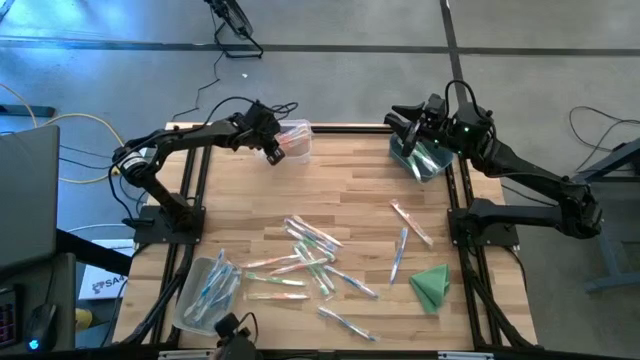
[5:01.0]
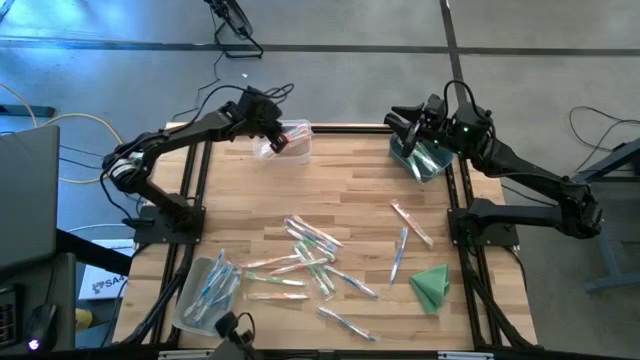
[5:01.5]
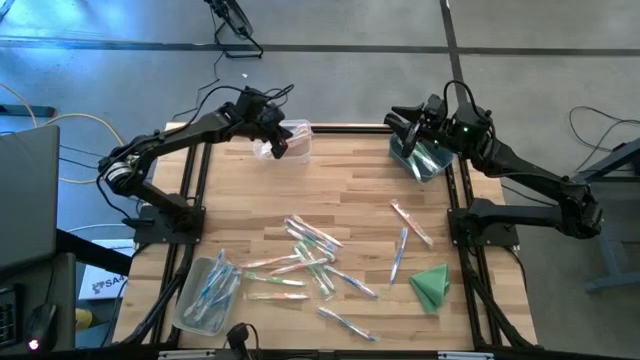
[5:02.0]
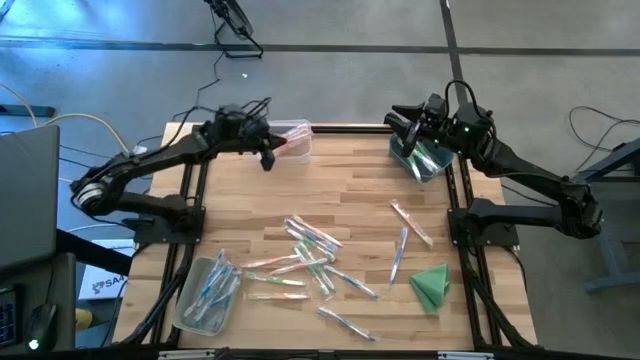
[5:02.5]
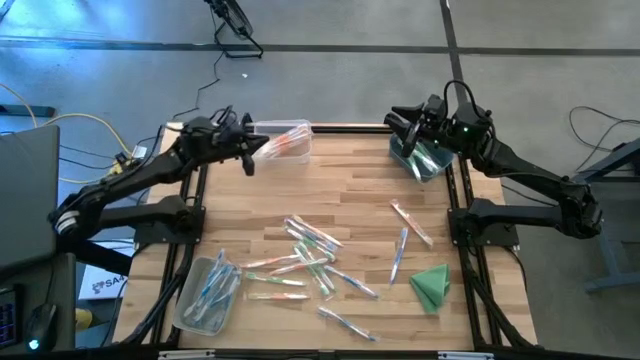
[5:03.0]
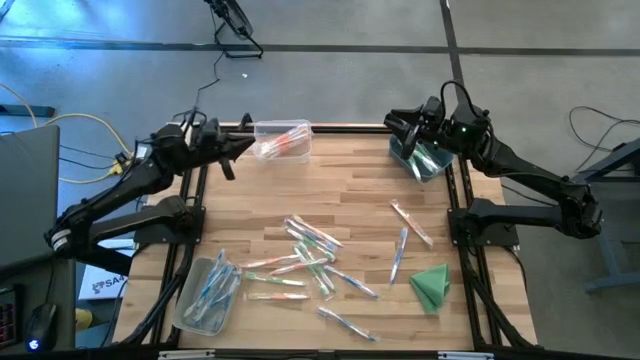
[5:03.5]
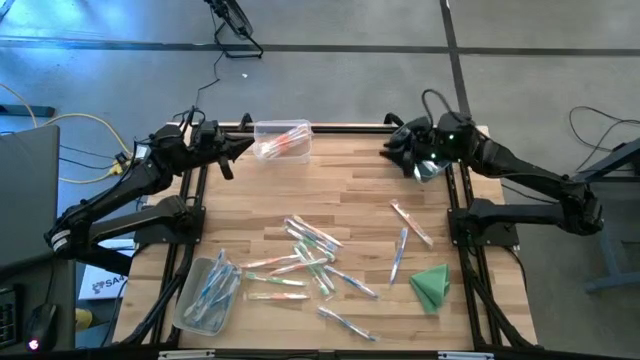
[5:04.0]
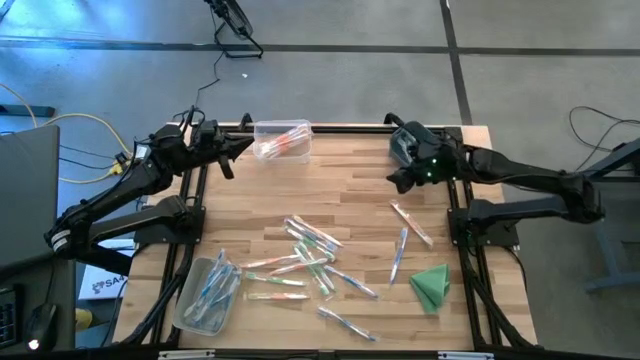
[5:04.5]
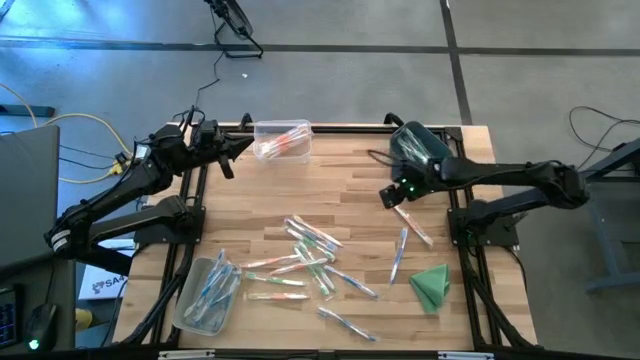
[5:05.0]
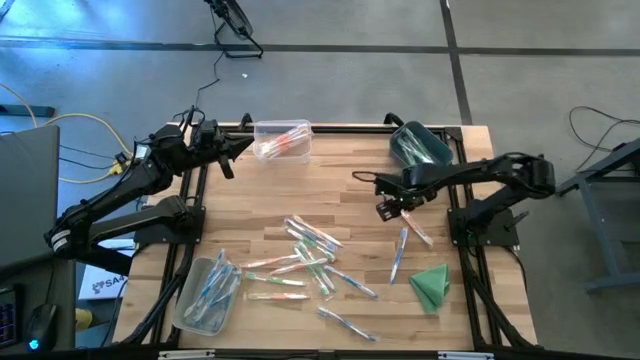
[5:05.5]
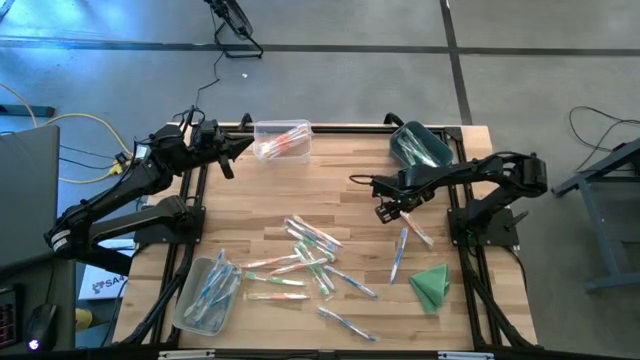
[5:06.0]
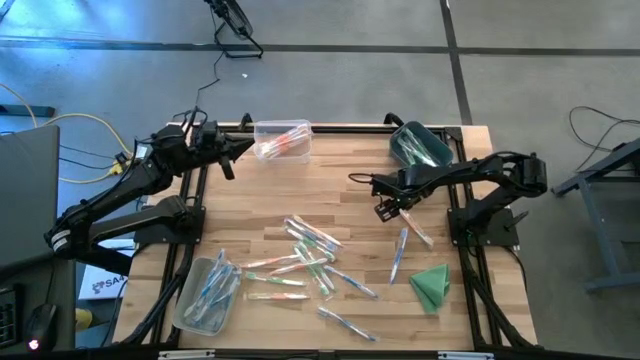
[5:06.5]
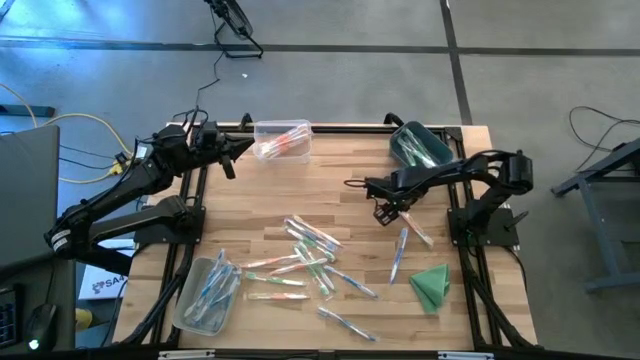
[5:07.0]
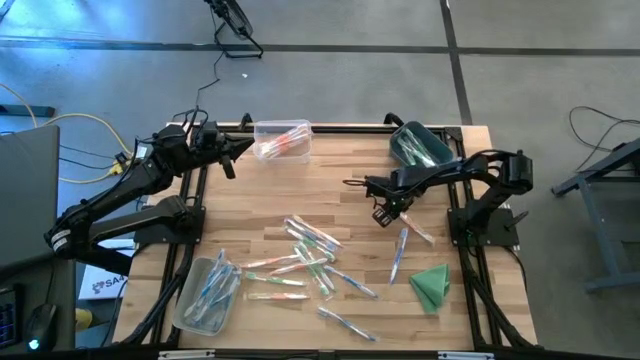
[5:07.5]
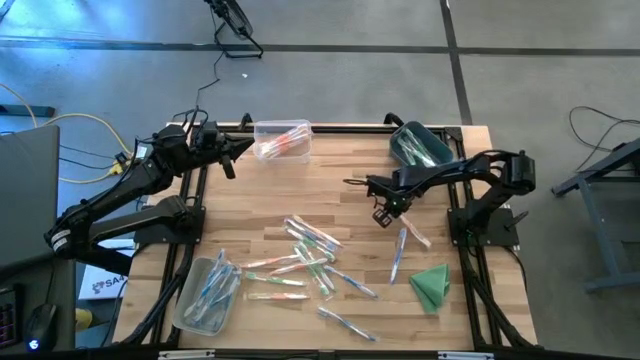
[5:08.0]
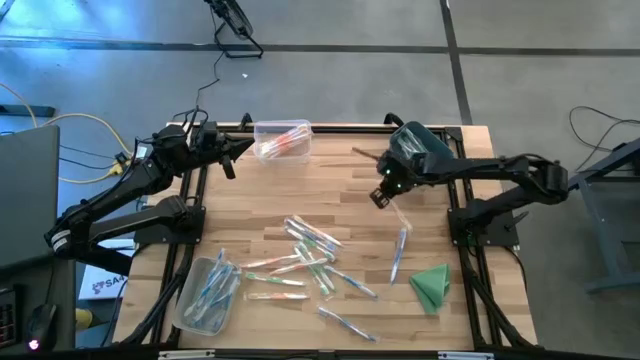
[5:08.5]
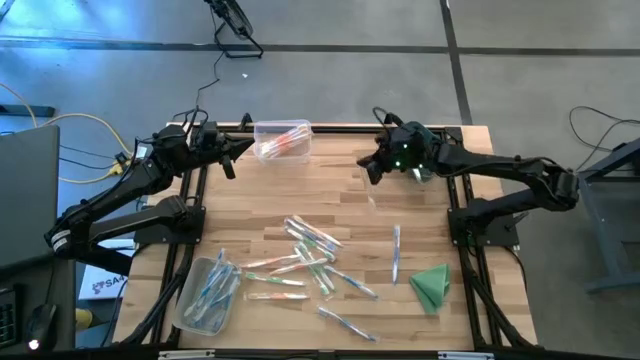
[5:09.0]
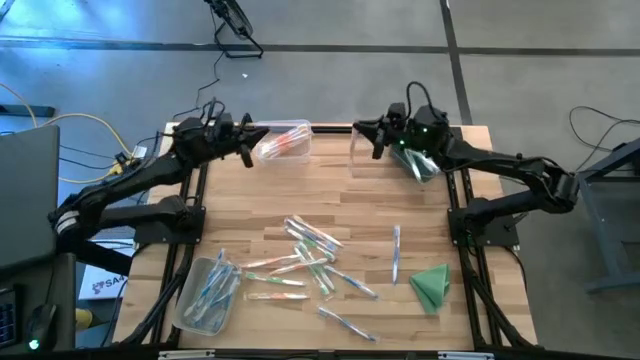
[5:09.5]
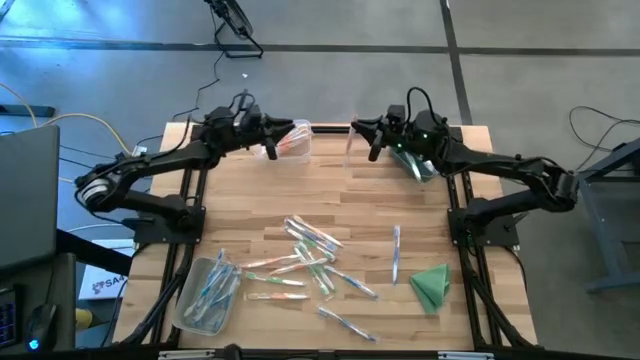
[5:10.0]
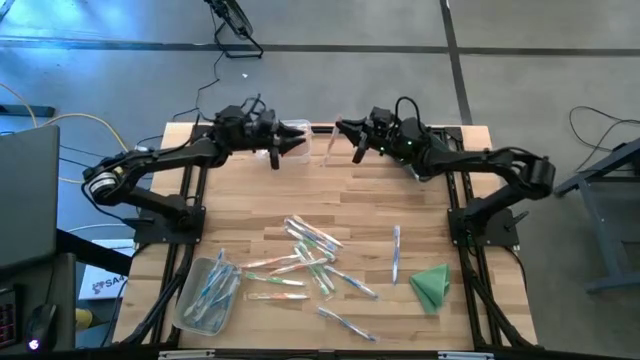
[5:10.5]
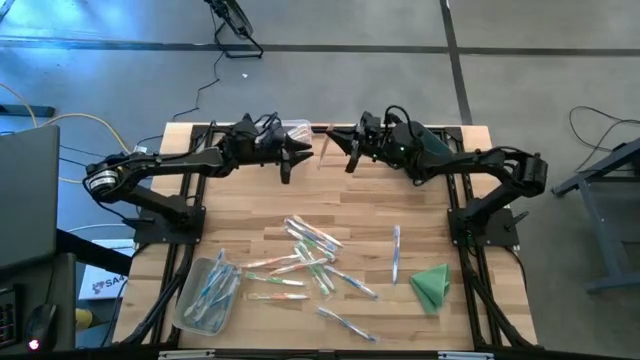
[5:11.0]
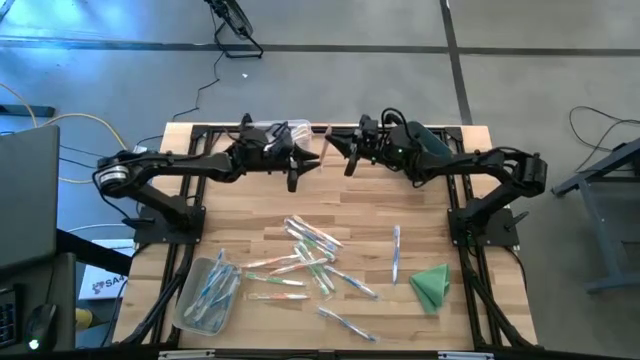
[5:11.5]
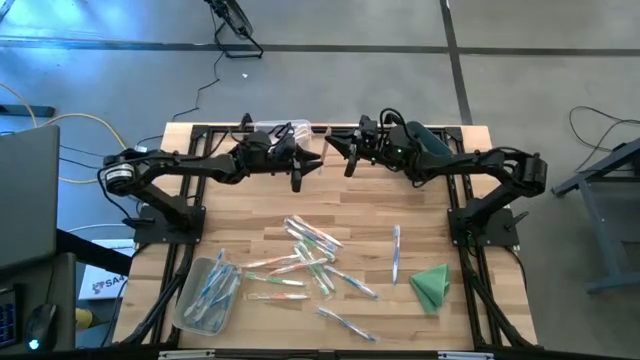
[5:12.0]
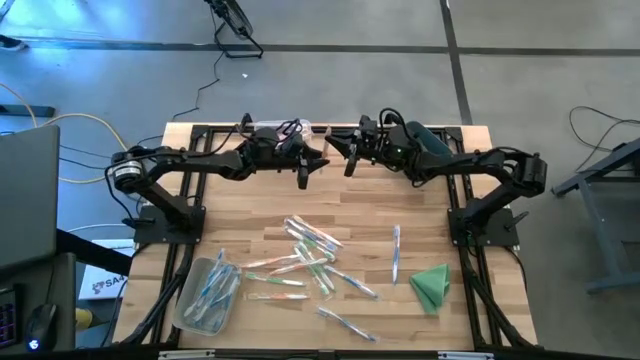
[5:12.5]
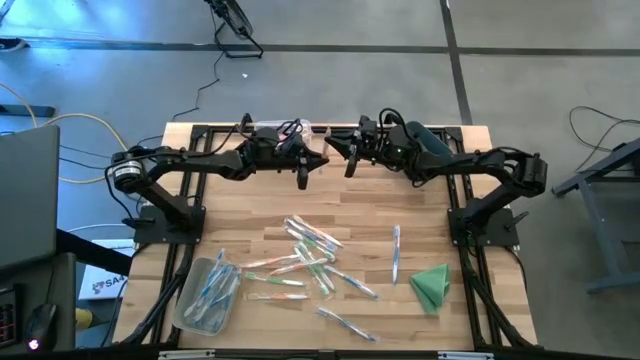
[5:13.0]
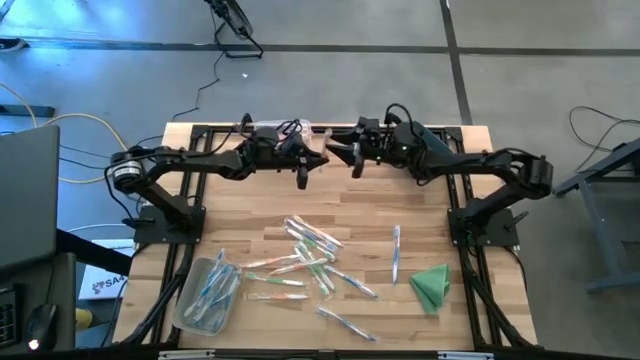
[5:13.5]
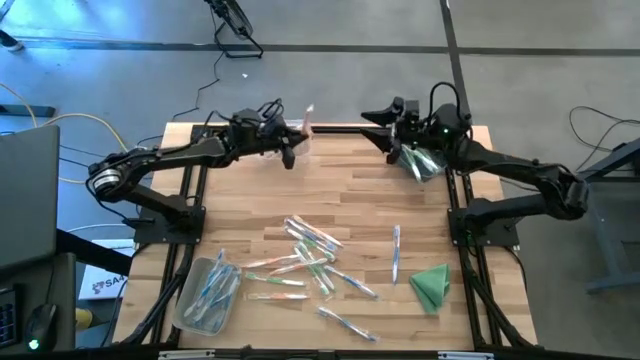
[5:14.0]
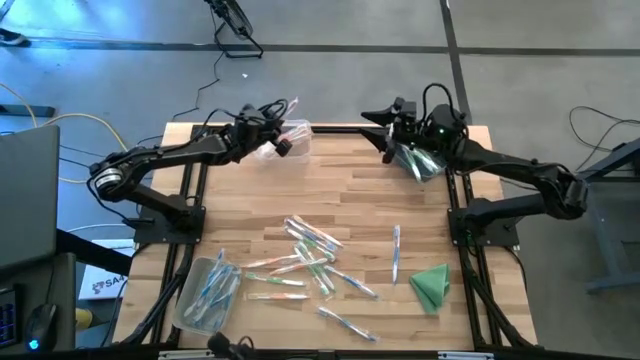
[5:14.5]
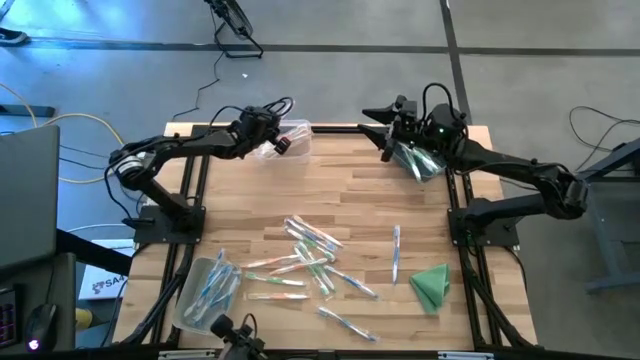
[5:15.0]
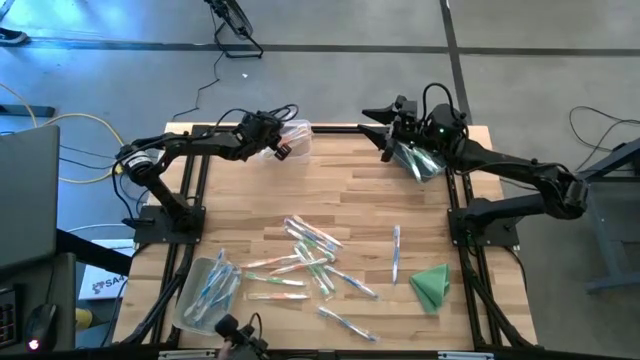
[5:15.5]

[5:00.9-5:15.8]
Task: Pick & Place Toothbrushes
Put the orange toothbrush into the transparent bin
